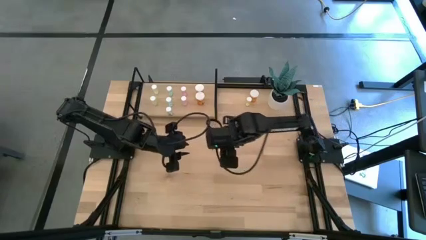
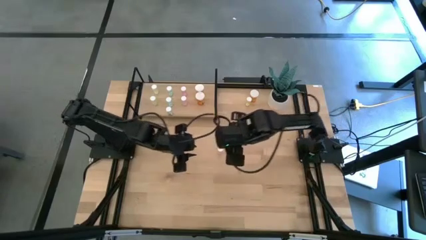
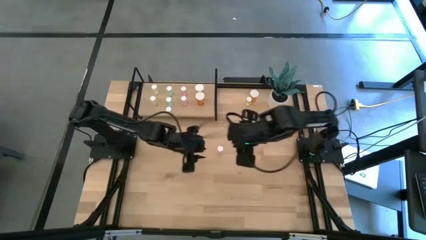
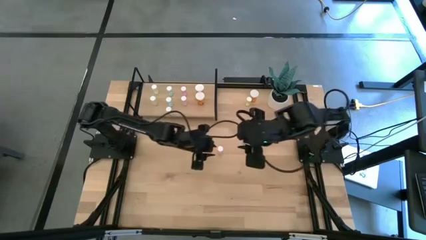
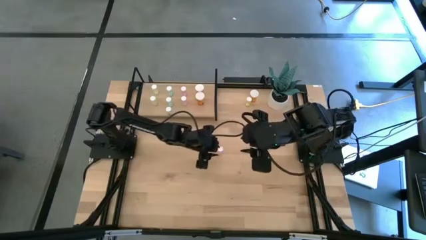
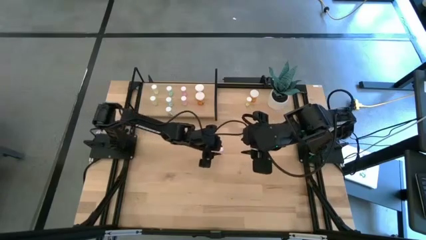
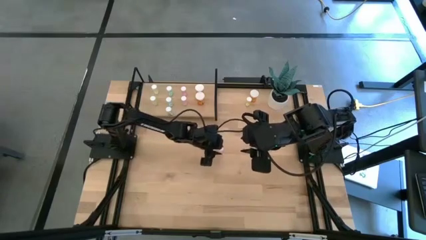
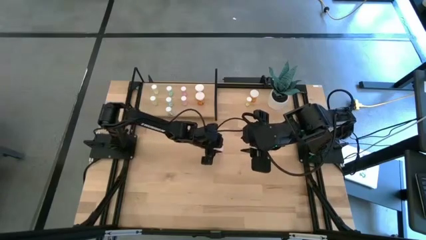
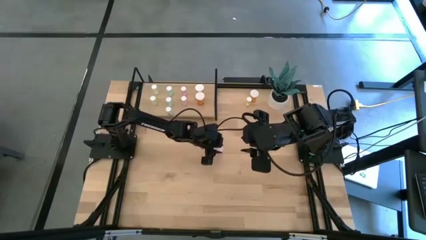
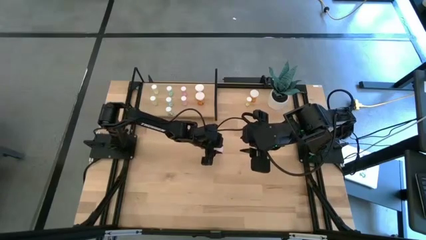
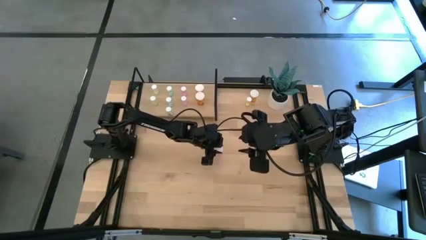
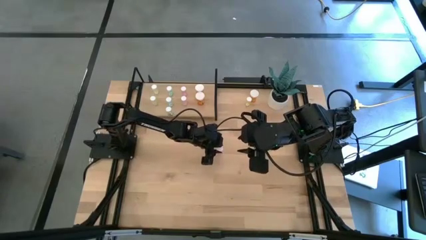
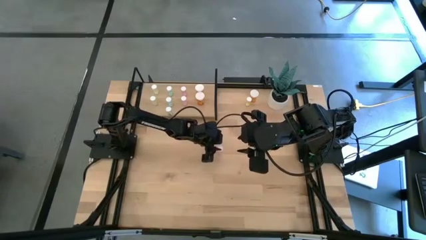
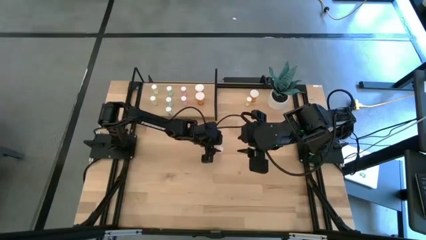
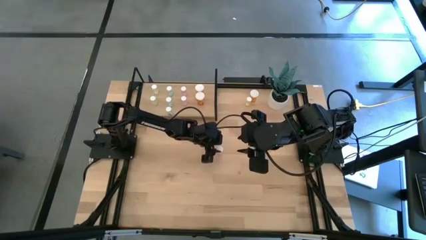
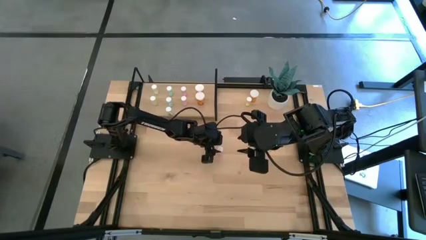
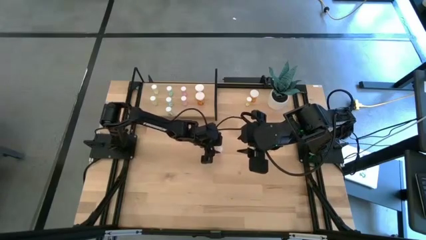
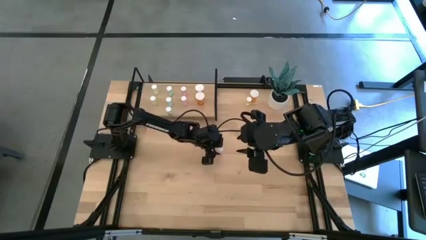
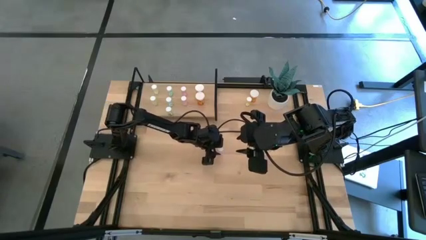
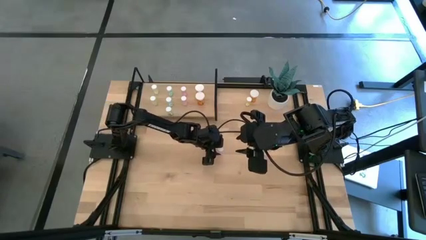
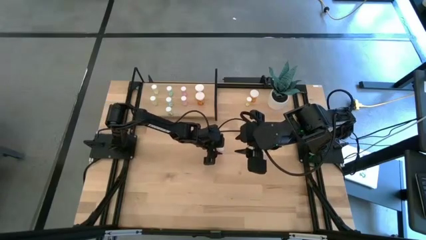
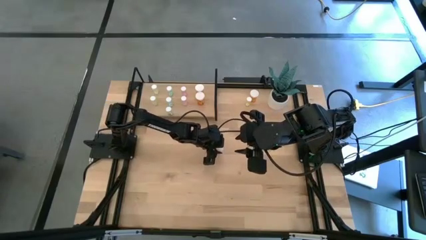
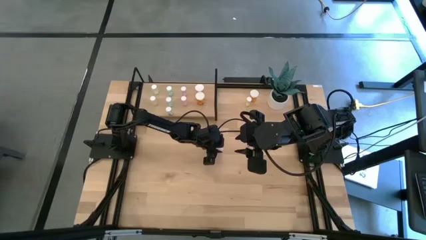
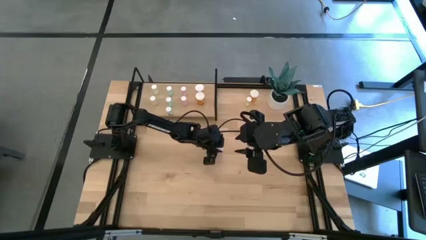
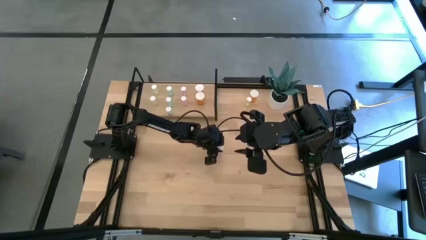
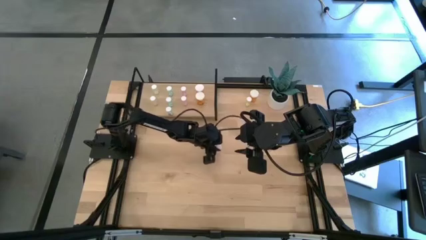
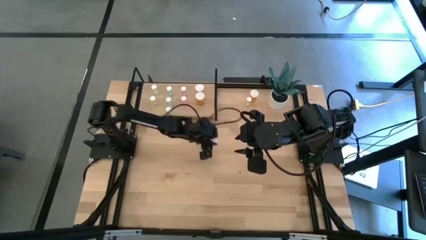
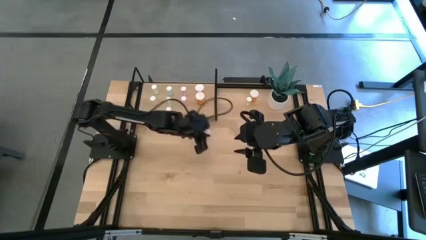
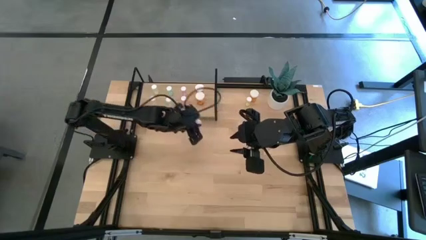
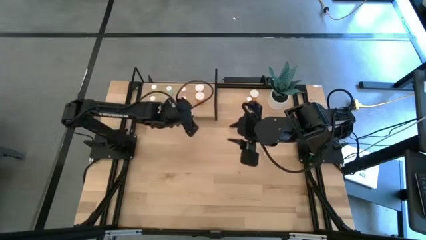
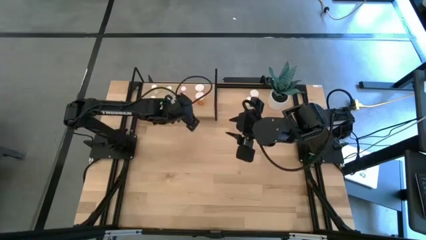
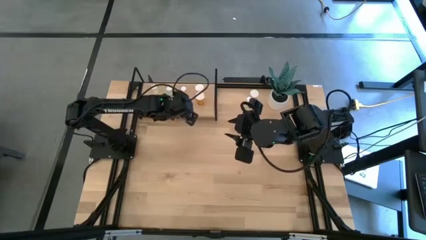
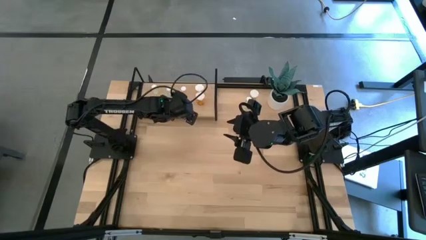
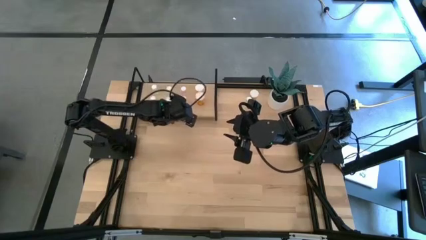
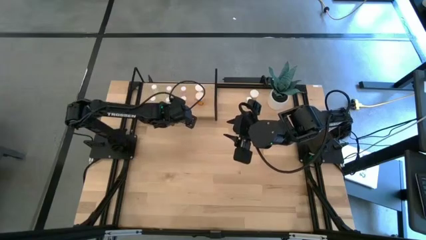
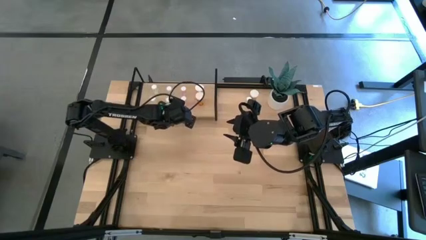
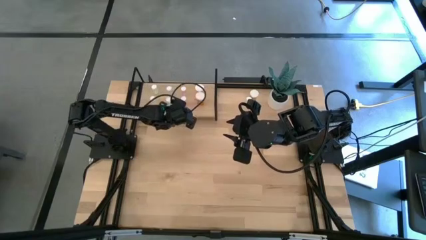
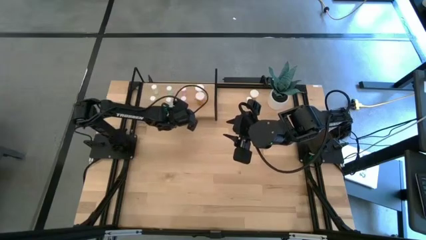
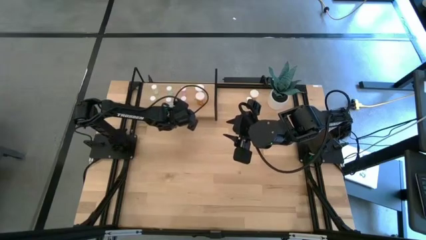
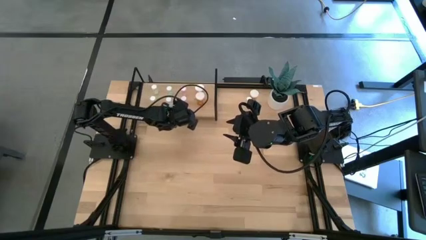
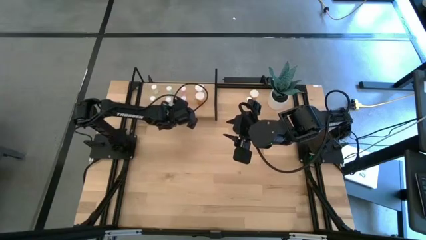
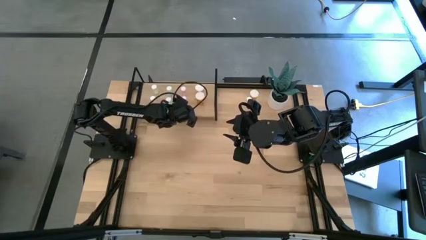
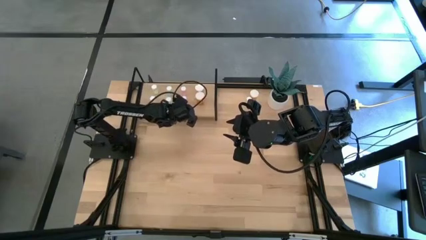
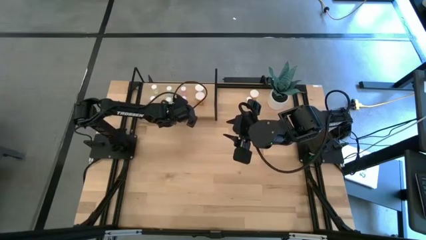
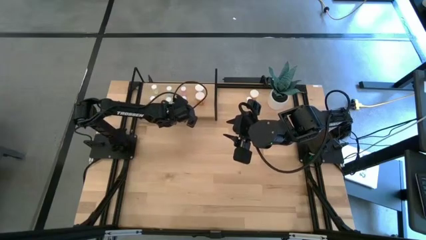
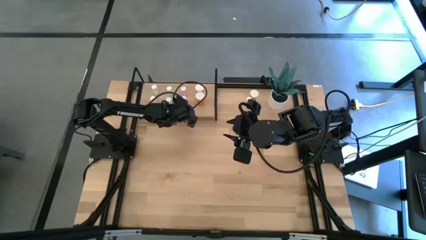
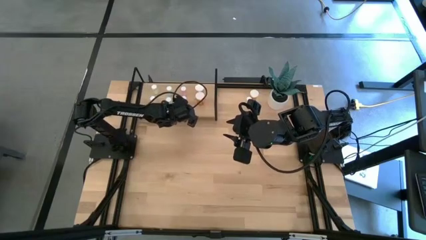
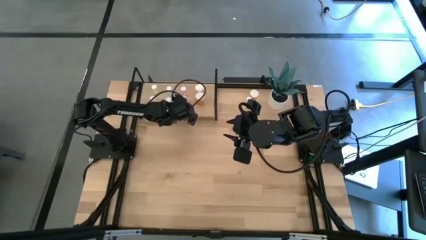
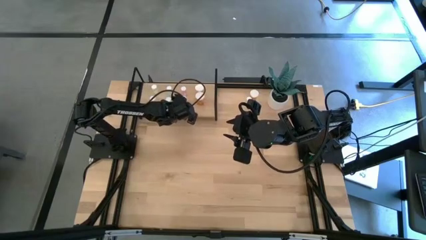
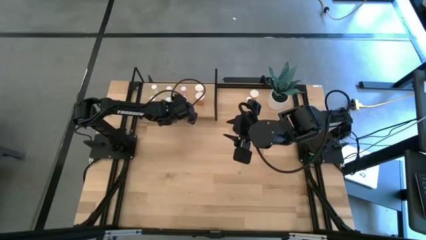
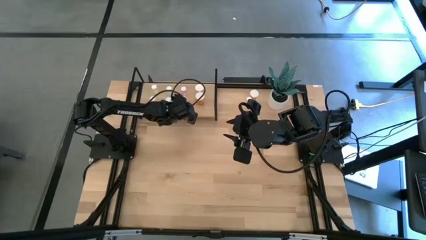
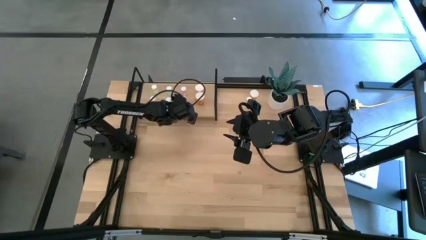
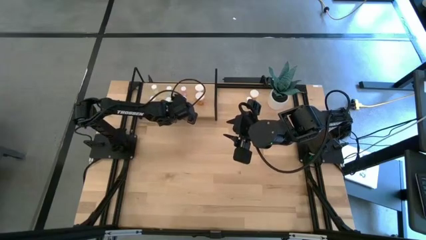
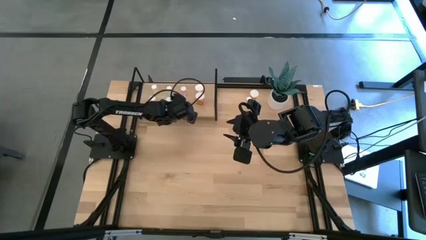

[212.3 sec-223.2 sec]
Task: Pick and place medicine bottles onto shelf by color
Put the pink pill bottle on the shelf and align it with the other pink pill bottles

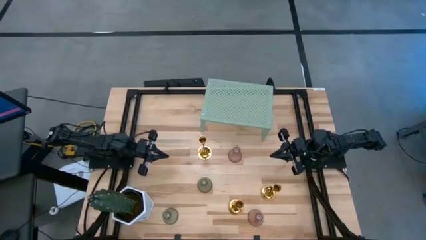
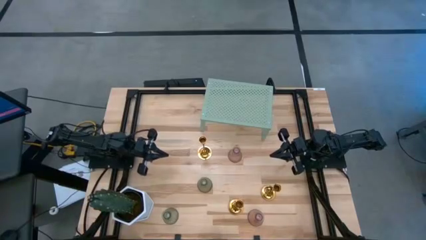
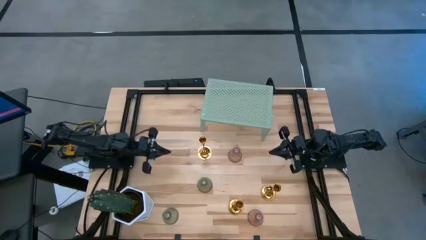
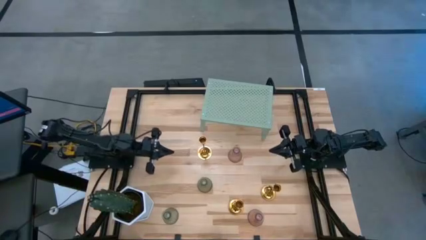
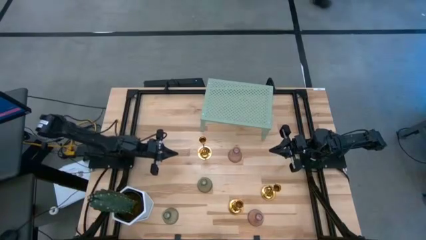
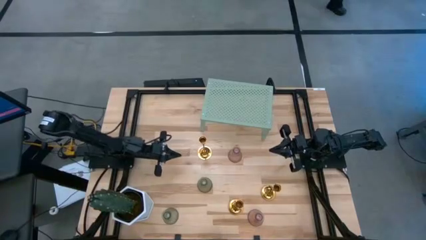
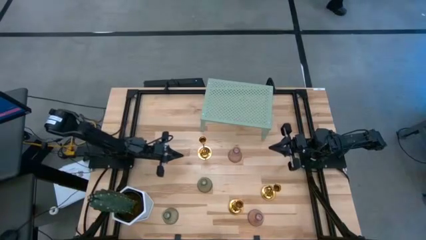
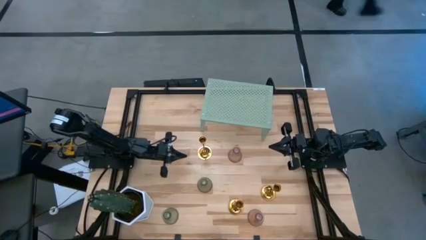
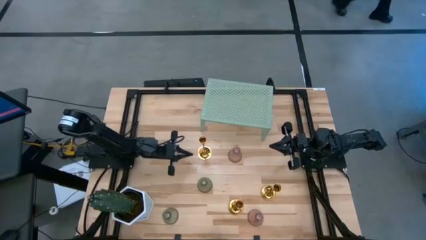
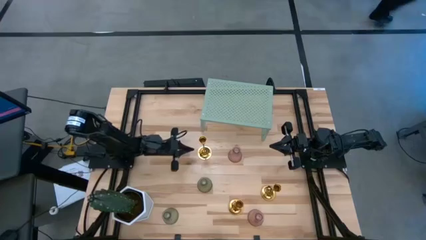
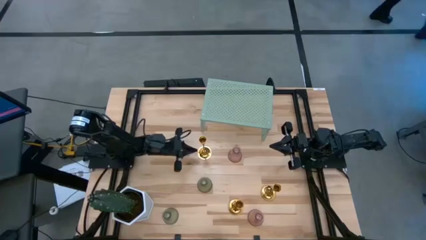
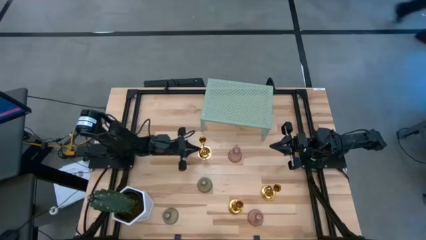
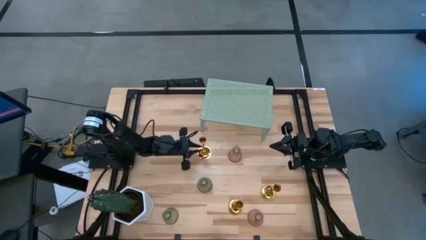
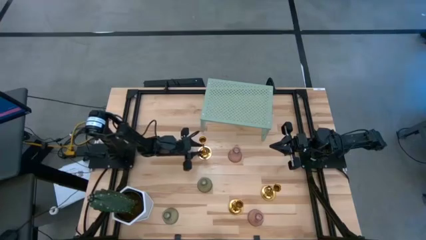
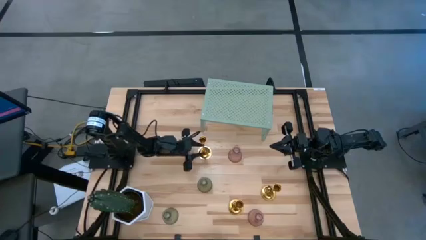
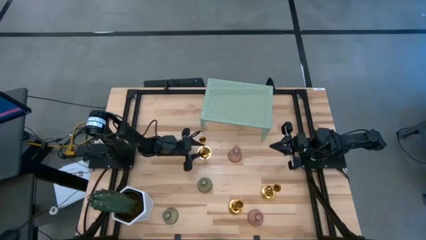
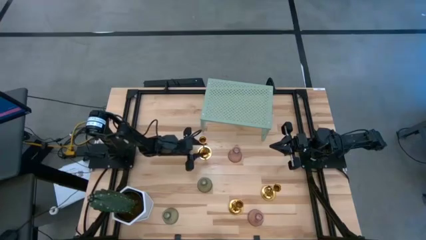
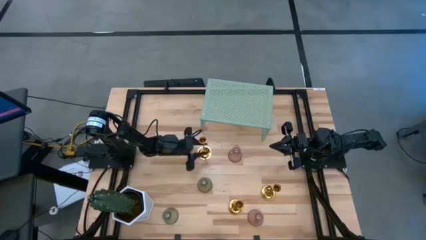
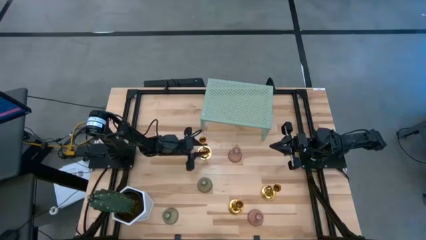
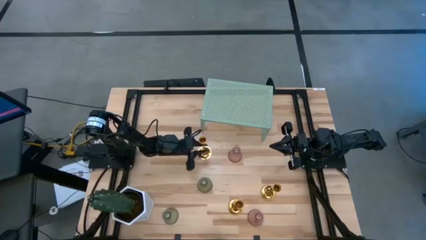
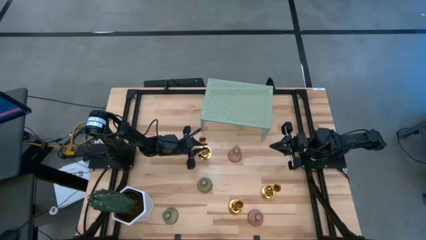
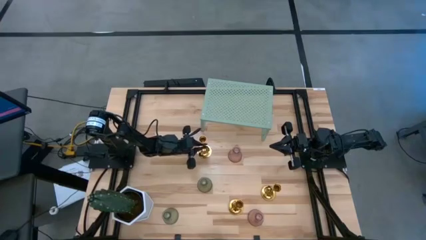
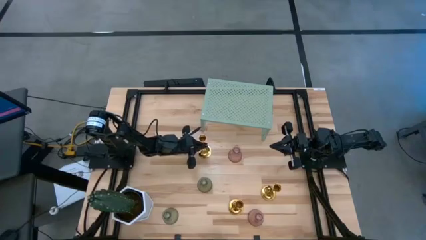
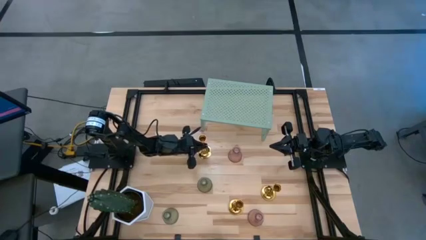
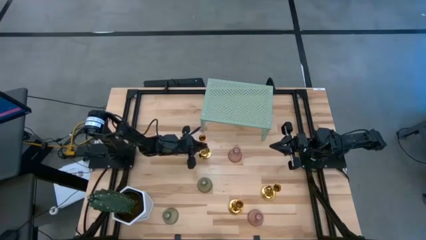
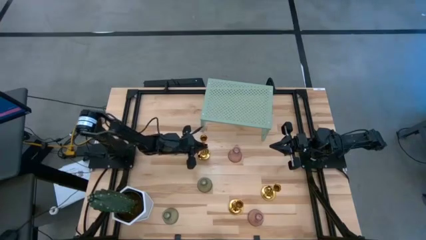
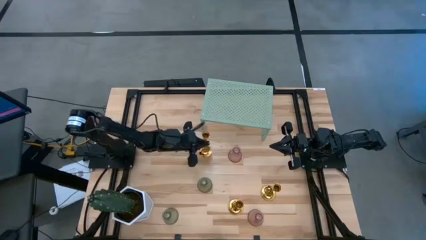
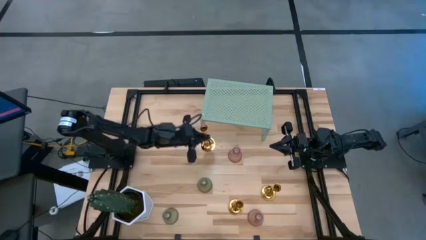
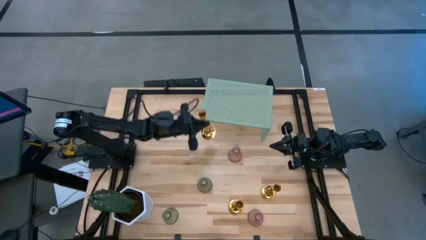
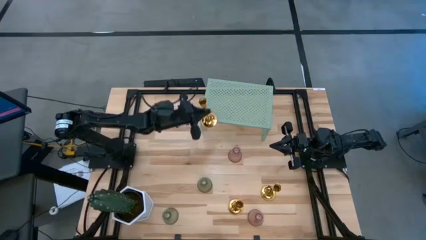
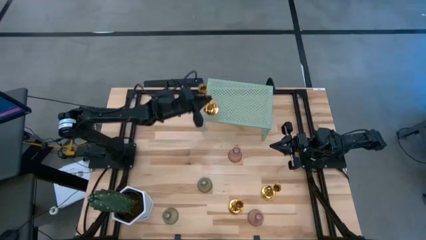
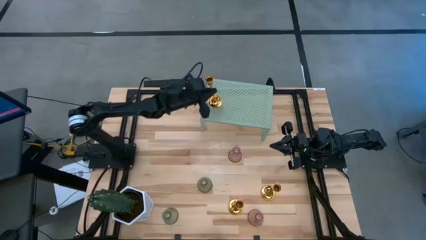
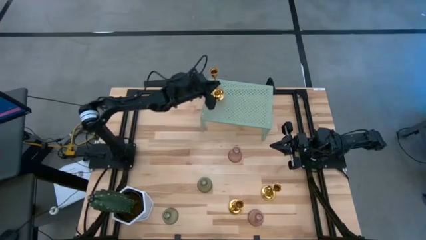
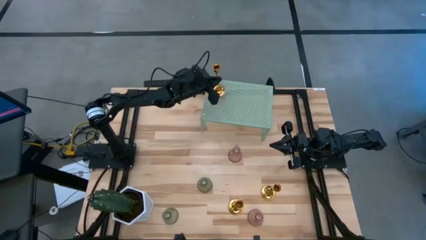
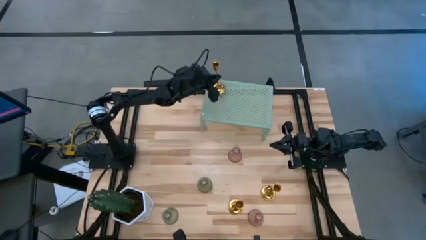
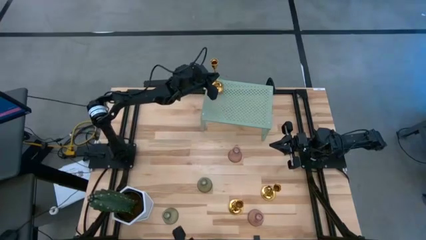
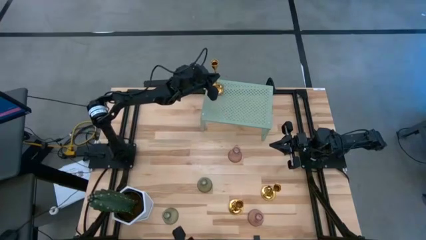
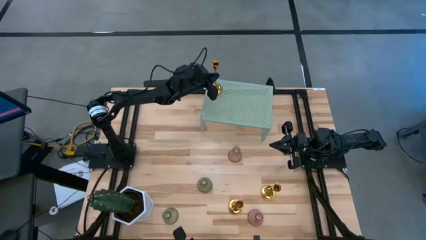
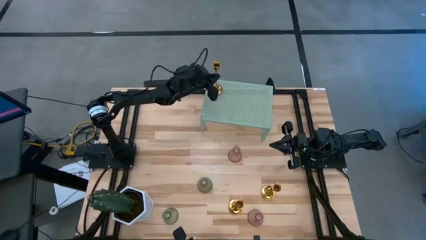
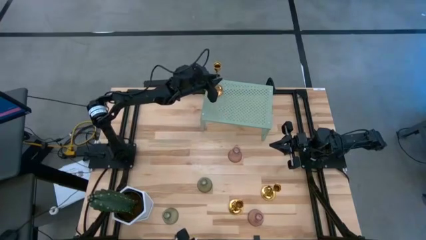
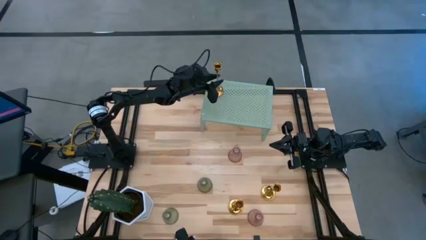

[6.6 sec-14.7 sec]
Task: Pick & Place candle stick holders
Put the top golden candle holder on the shelf
